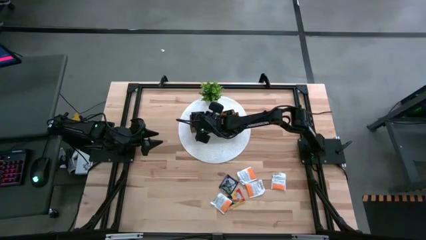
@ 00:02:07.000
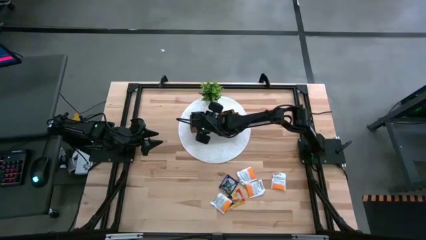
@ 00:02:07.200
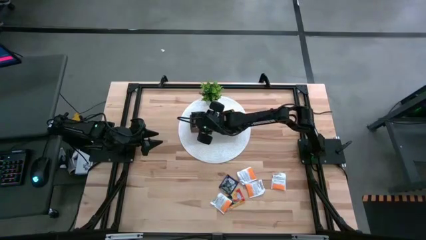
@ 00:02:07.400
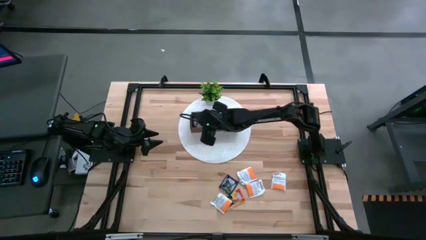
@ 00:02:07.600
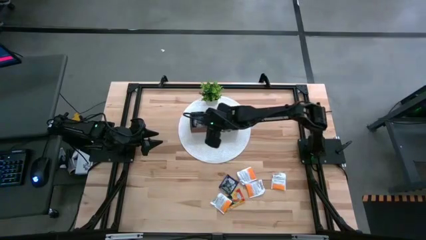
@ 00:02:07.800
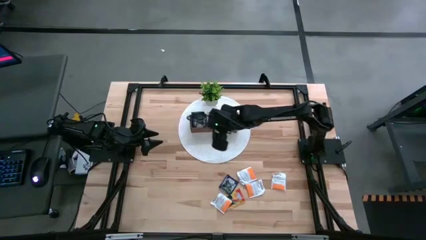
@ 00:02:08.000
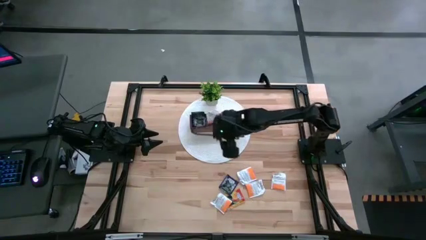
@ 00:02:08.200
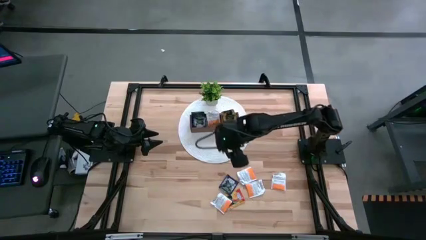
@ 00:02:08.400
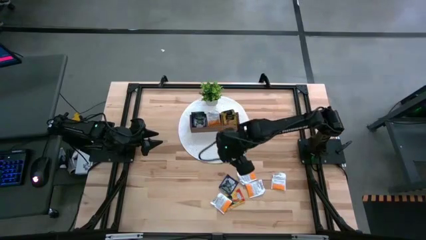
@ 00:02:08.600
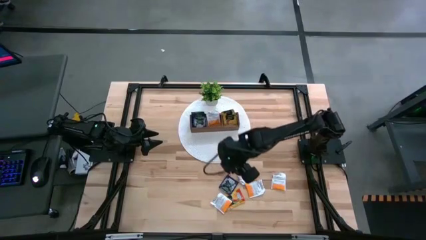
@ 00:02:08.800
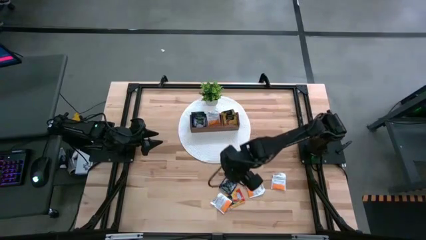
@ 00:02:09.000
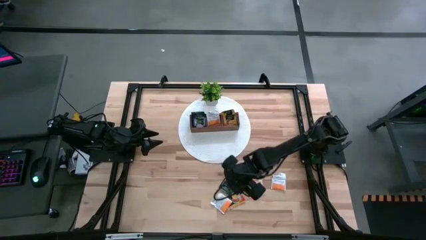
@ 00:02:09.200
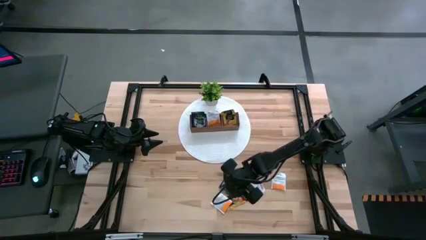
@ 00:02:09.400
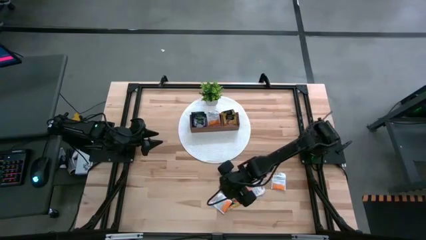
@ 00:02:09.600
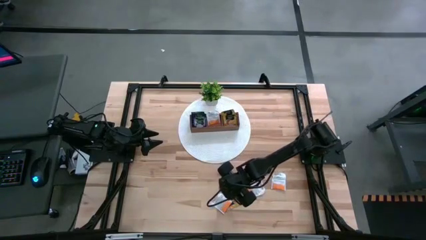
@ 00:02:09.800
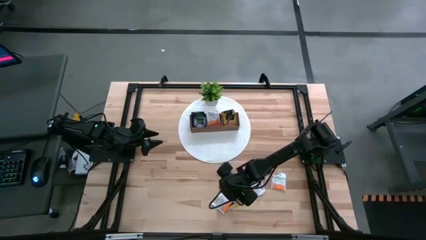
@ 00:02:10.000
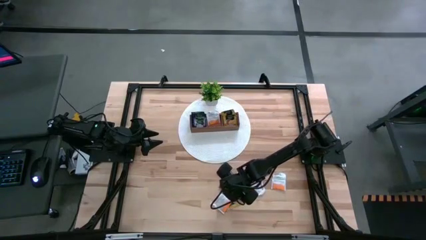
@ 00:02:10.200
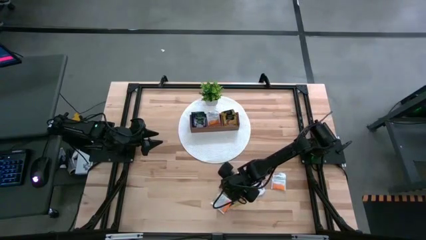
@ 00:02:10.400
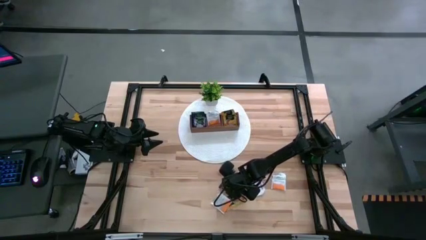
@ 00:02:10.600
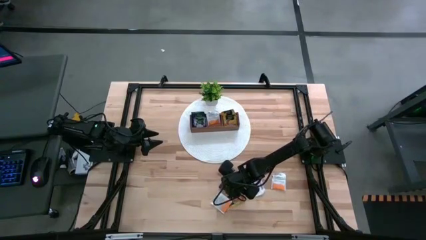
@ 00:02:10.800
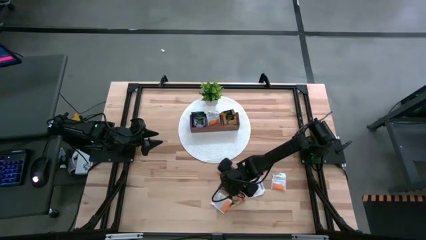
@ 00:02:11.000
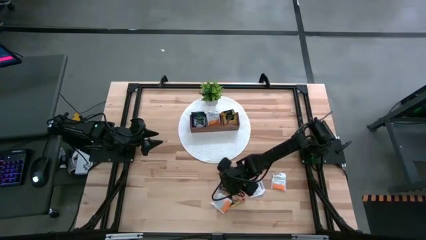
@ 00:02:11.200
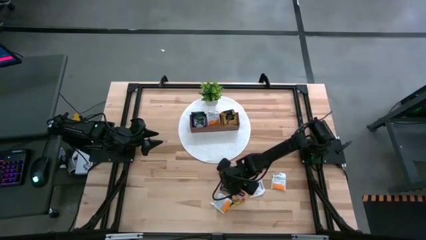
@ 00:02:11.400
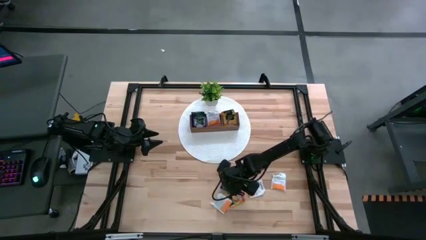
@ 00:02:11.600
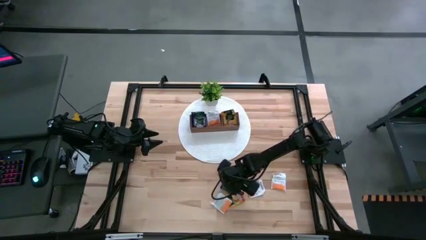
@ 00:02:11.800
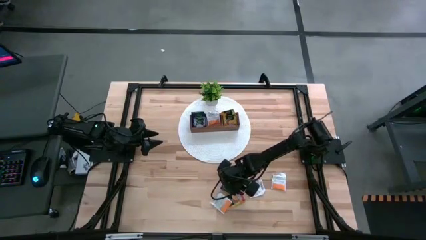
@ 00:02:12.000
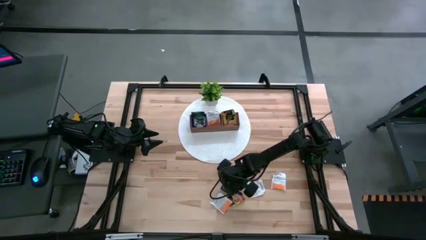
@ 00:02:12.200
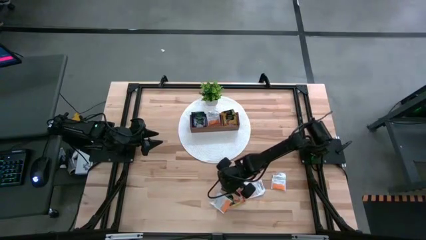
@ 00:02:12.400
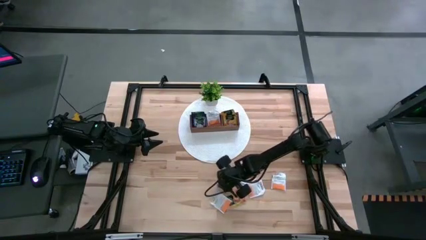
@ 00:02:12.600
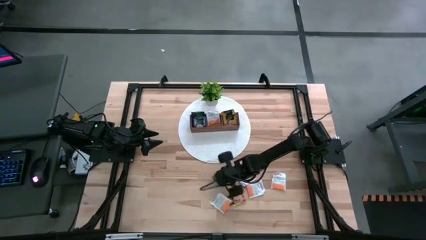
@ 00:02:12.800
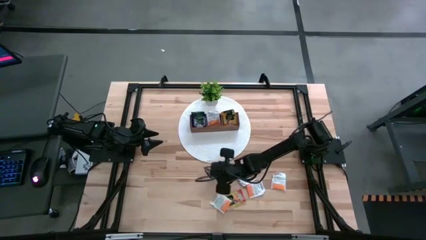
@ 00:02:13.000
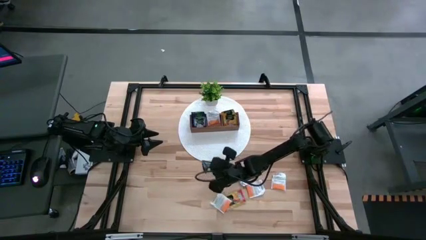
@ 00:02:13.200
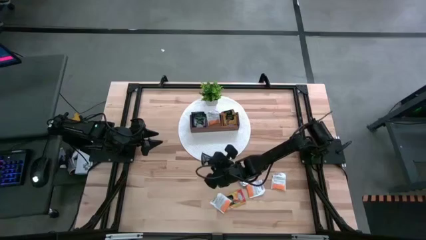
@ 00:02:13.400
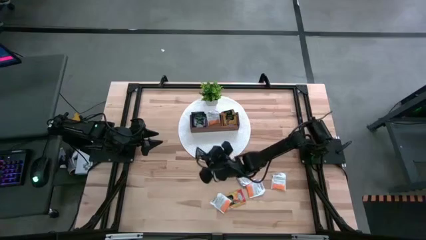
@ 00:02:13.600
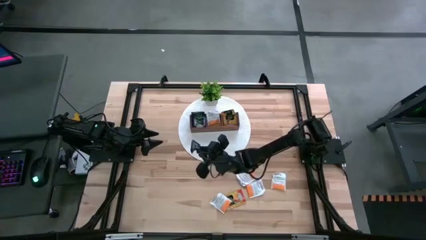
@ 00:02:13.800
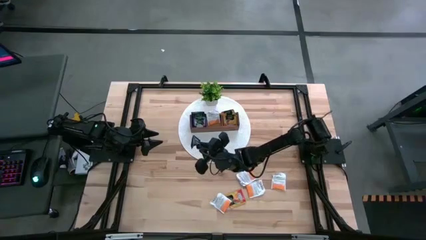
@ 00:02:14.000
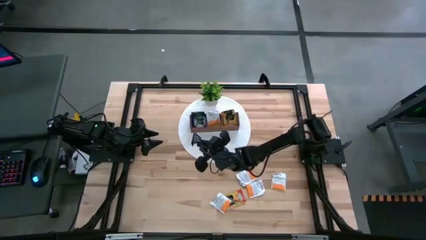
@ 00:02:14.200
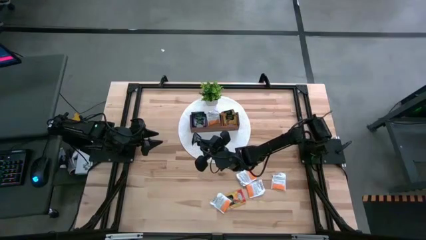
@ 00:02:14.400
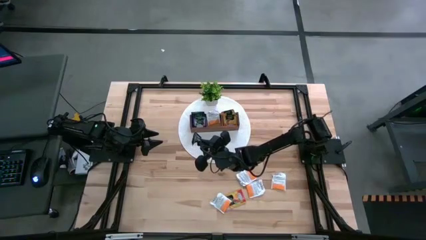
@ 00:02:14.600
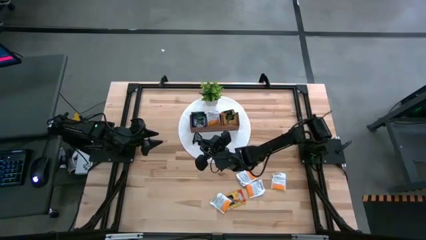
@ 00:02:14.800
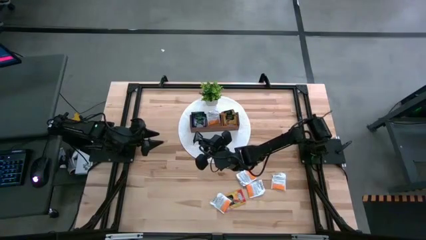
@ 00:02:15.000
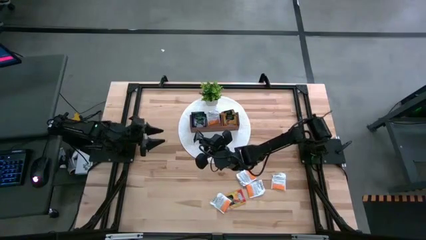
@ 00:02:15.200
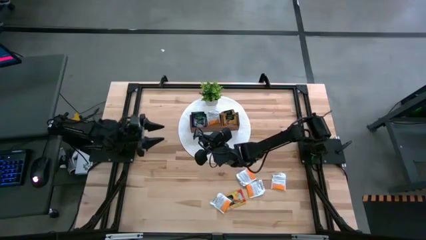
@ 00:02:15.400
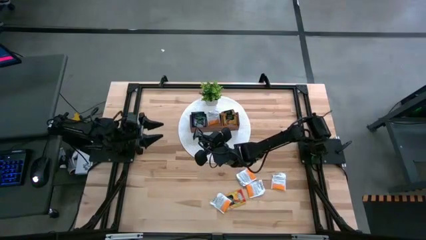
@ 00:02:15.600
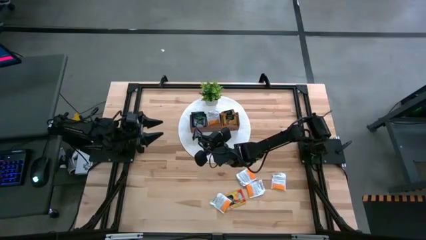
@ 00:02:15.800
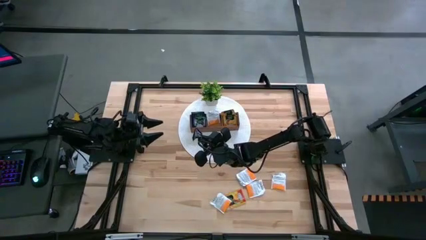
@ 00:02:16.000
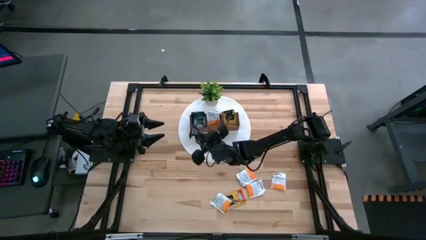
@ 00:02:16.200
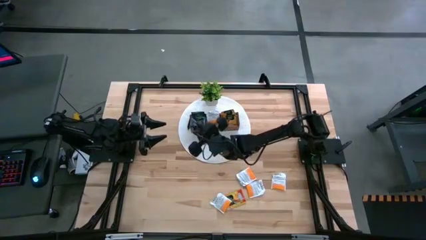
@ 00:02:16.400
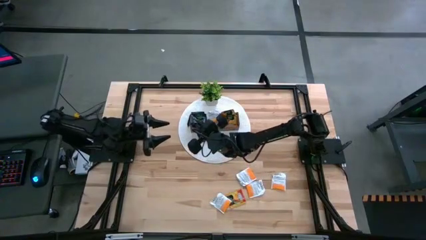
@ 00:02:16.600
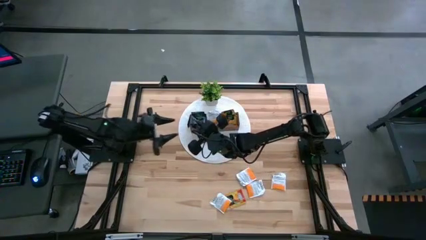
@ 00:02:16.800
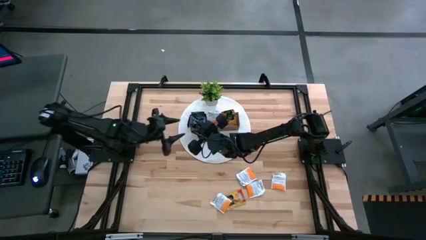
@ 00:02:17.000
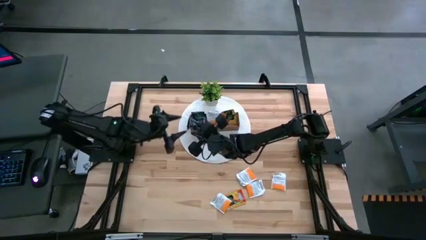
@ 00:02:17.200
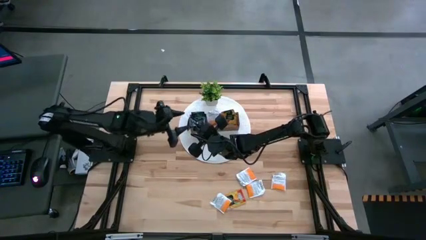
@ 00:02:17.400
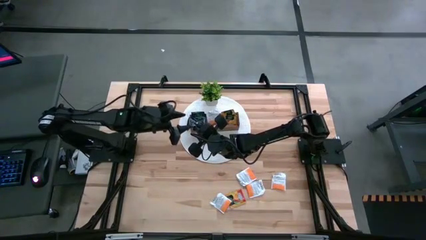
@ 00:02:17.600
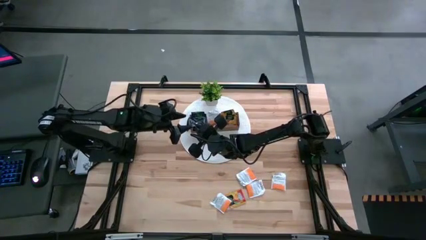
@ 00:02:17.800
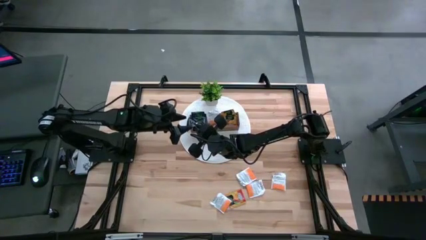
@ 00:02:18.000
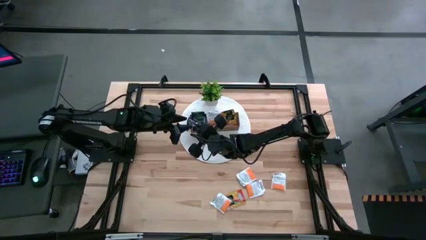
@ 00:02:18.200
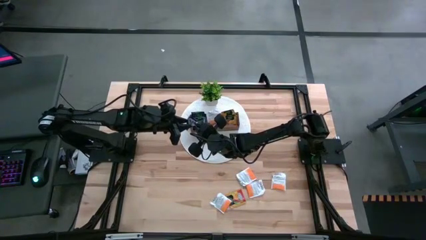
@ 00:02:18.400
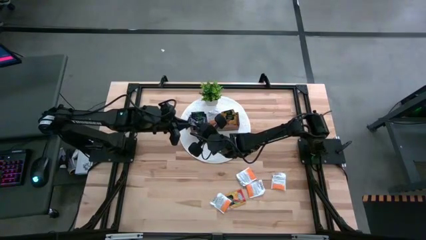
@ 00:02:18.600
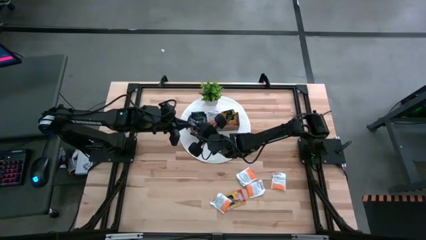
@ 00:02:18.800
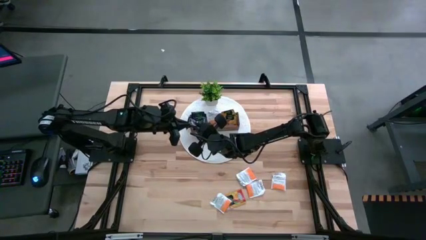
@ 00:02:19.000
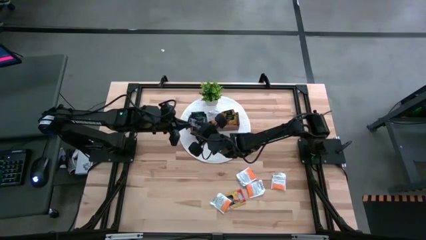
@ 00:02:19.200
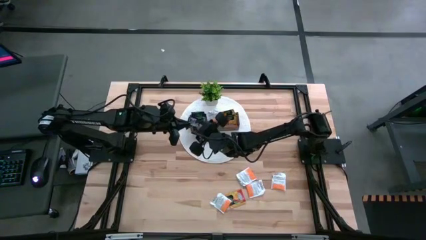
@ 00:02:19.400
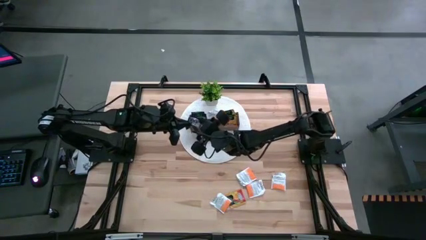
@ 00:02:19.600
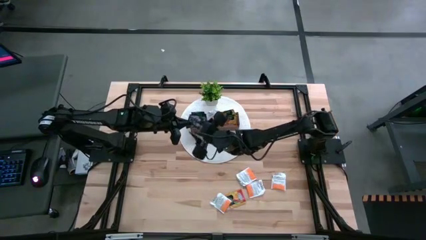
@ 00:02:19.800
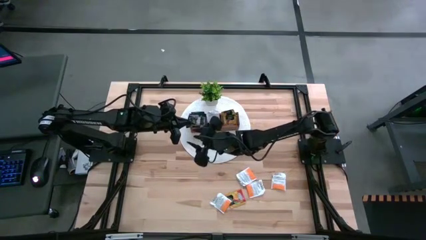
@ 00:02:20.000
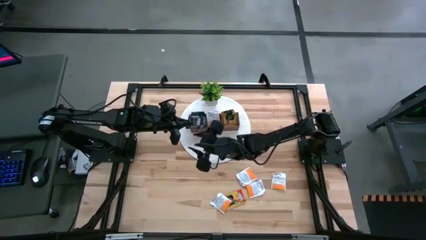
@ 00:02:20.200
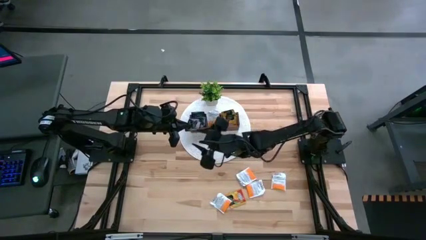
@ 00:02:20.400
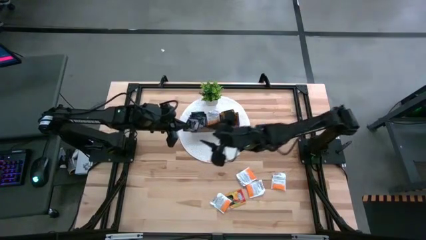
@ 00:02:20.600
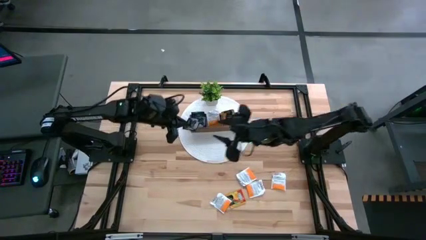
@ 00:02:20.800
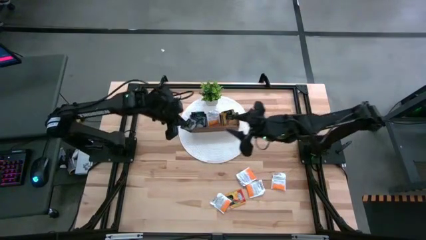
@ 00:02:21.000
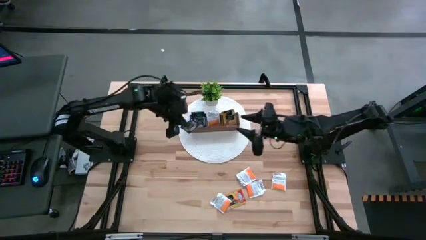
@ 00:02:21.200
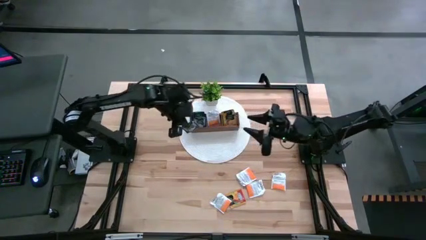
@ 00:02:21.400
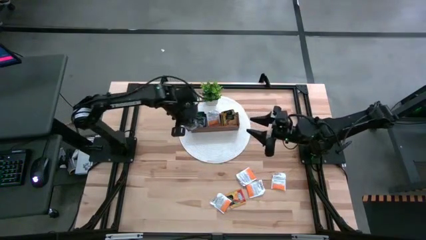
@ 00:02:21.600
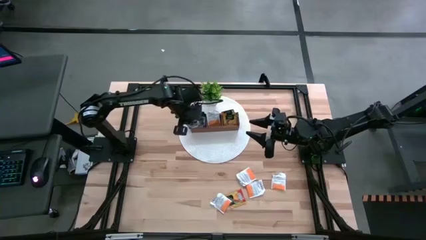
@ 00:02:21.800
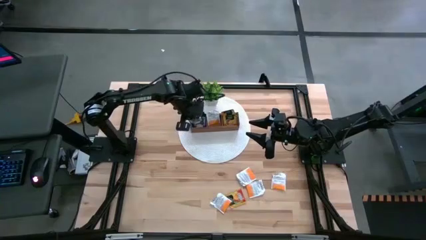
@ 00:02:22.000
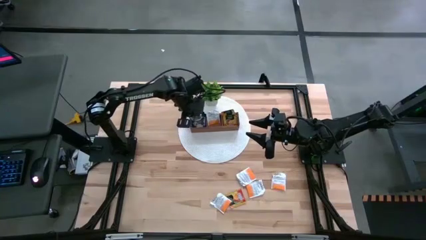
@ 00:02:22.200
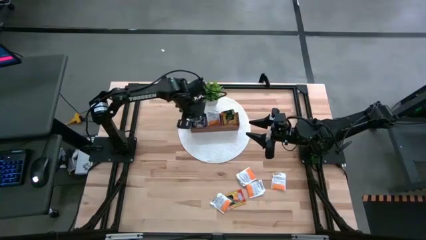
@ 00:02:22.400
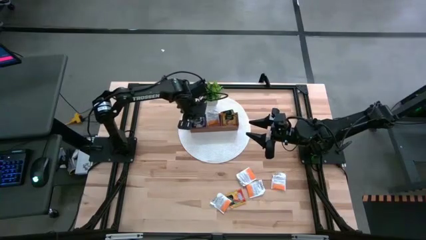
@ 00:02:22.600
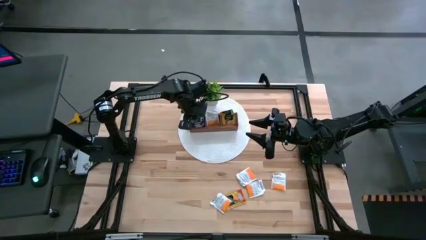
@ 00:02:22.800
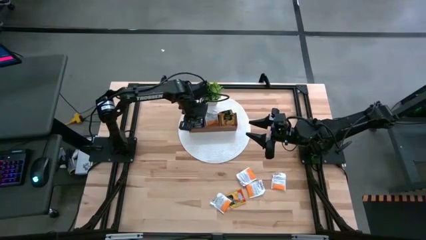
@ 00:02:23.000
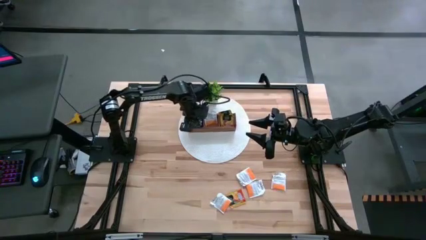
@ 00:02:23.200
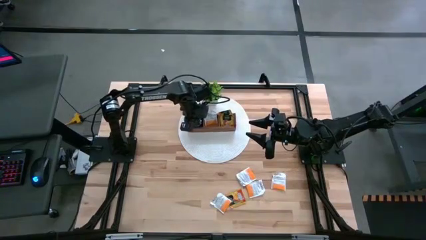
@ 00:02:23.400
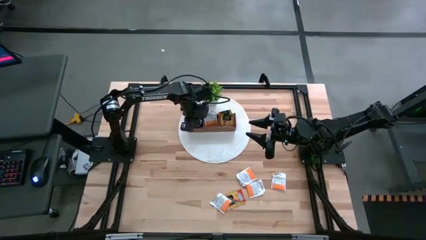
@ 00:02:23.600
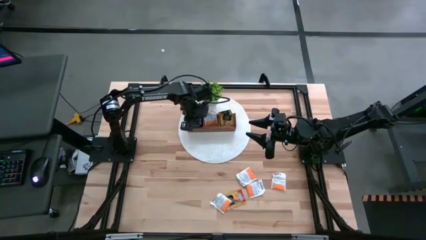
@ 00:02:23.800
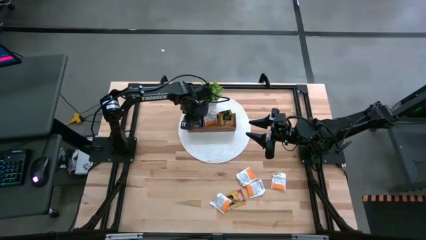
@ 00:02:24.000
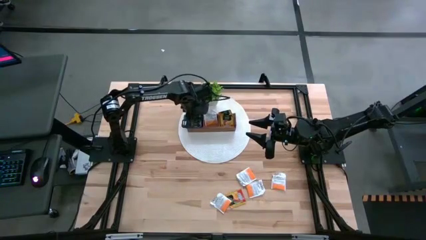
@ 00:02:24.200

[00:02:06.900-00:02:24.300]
Task: Pick & Place Tea
Put the black tea bag into the left section of the wooden organizer
